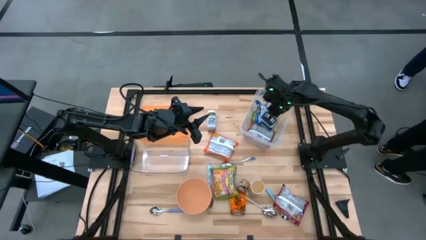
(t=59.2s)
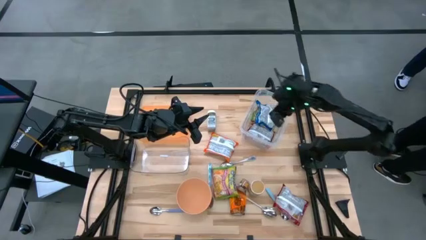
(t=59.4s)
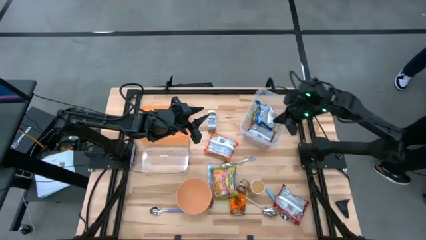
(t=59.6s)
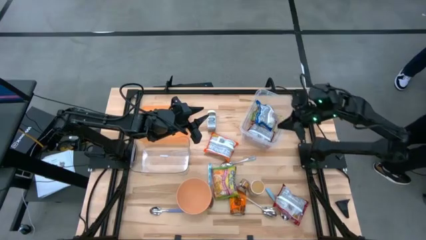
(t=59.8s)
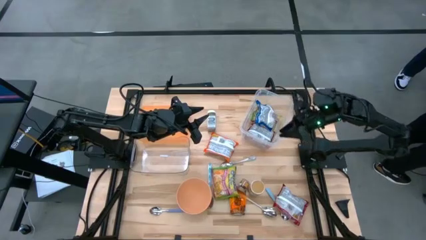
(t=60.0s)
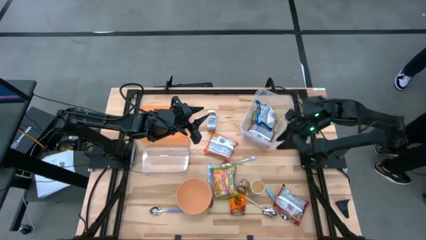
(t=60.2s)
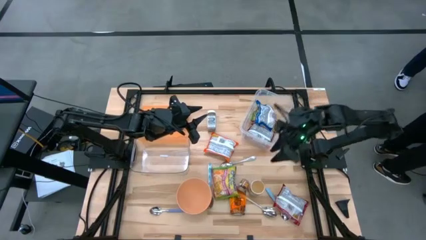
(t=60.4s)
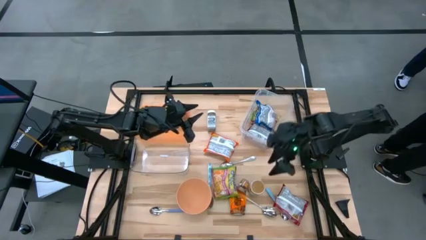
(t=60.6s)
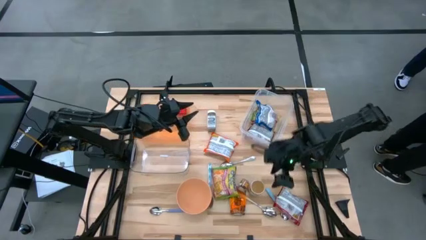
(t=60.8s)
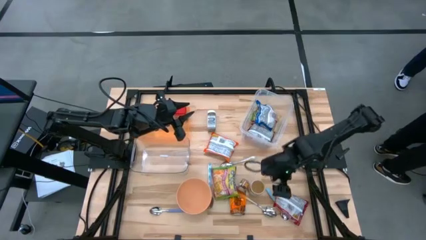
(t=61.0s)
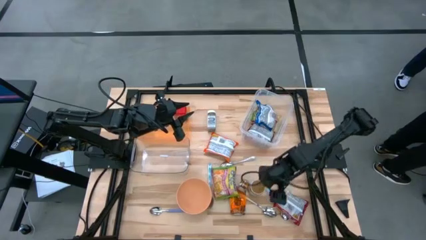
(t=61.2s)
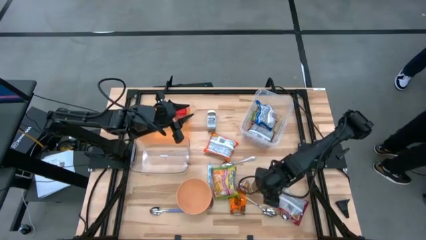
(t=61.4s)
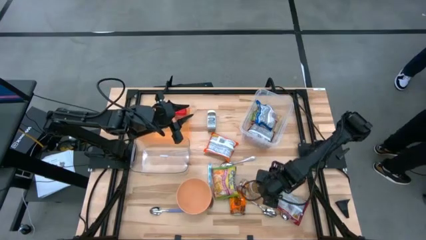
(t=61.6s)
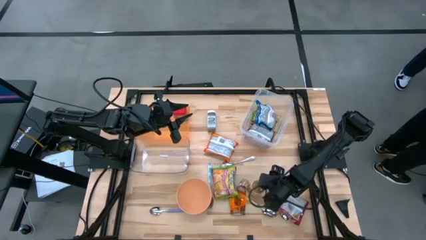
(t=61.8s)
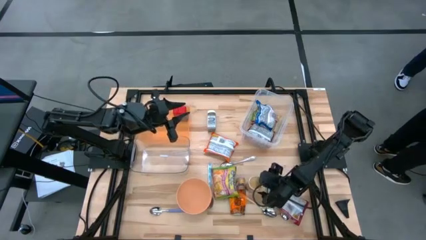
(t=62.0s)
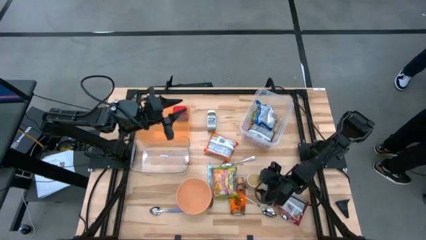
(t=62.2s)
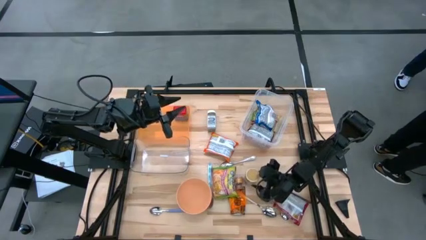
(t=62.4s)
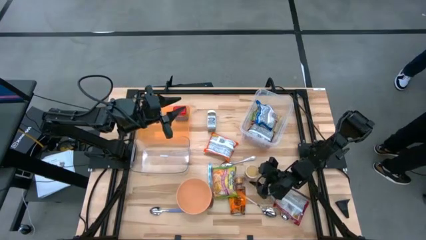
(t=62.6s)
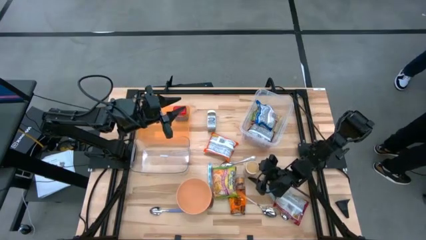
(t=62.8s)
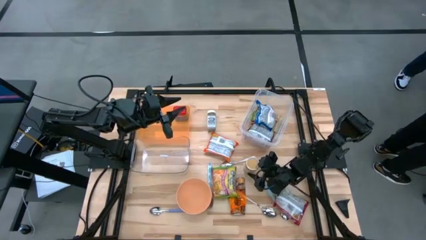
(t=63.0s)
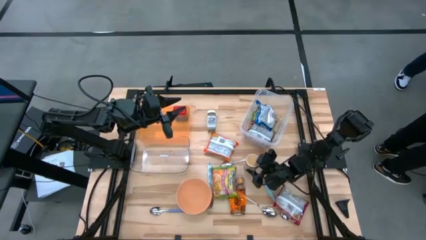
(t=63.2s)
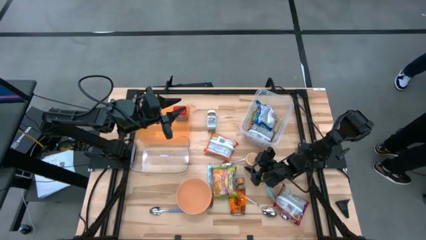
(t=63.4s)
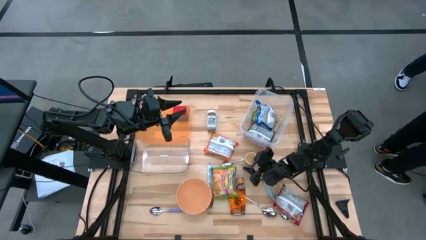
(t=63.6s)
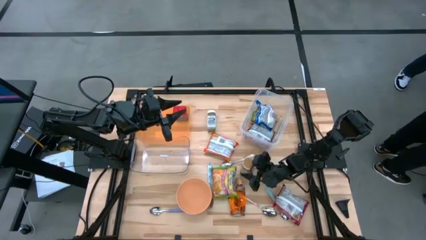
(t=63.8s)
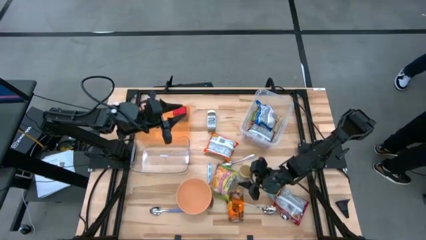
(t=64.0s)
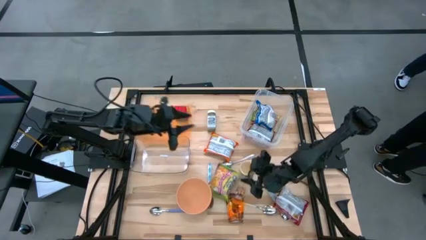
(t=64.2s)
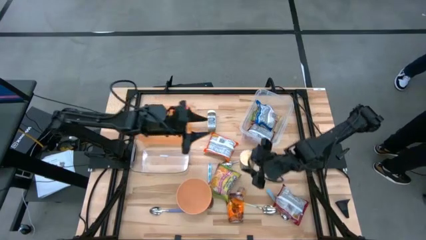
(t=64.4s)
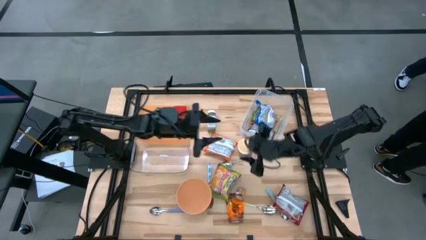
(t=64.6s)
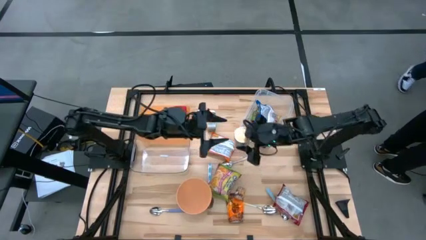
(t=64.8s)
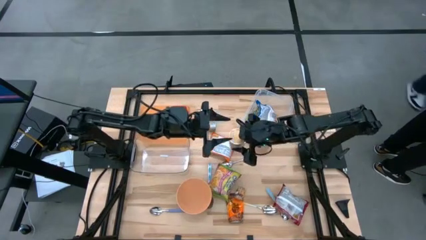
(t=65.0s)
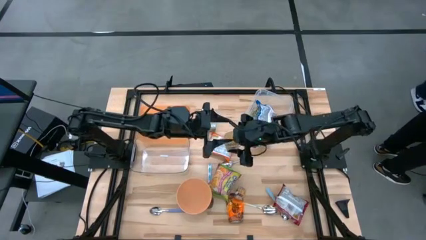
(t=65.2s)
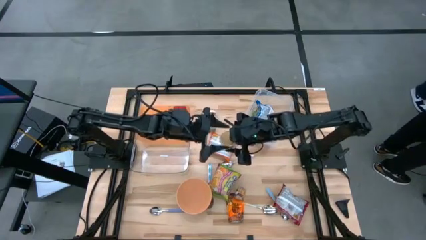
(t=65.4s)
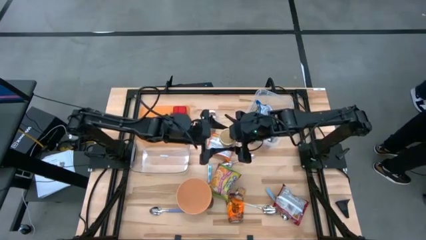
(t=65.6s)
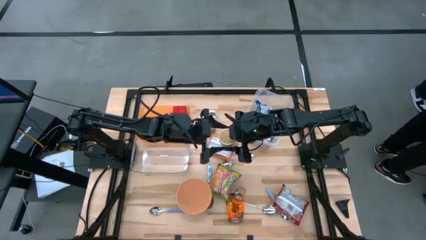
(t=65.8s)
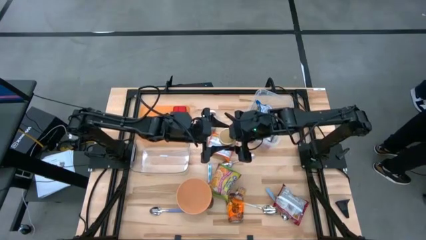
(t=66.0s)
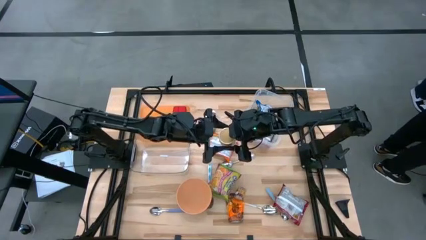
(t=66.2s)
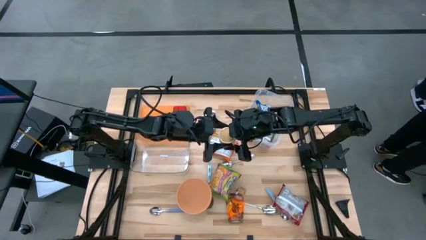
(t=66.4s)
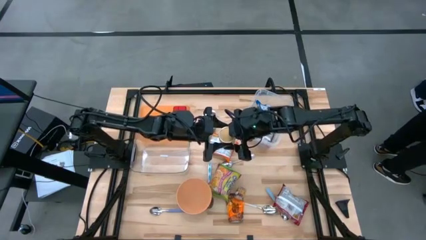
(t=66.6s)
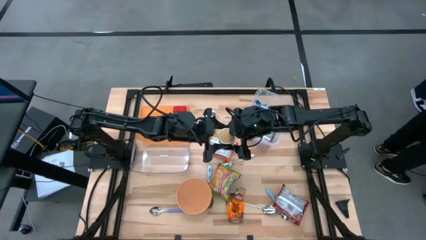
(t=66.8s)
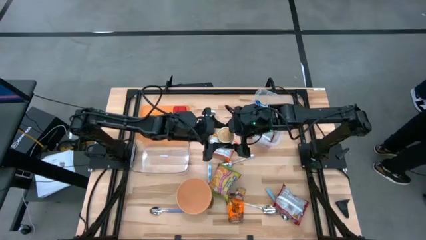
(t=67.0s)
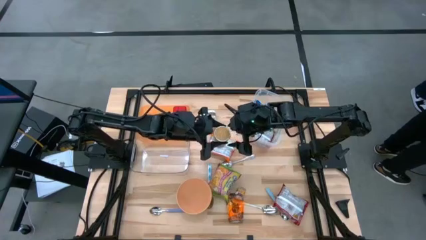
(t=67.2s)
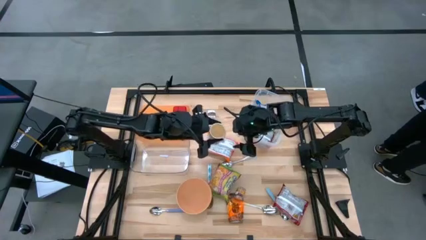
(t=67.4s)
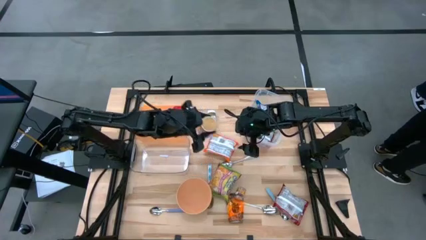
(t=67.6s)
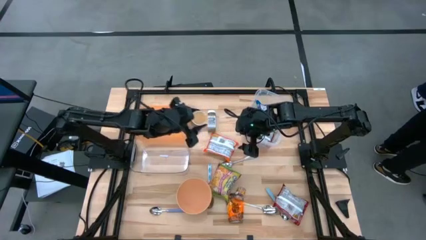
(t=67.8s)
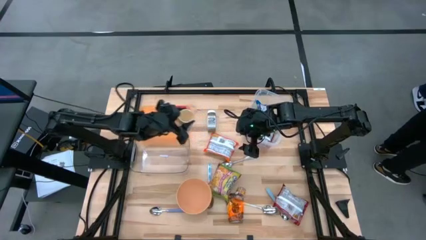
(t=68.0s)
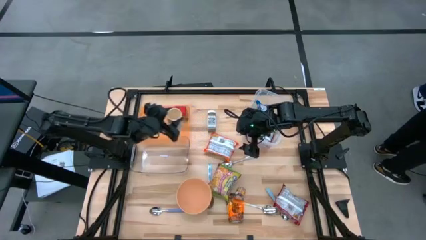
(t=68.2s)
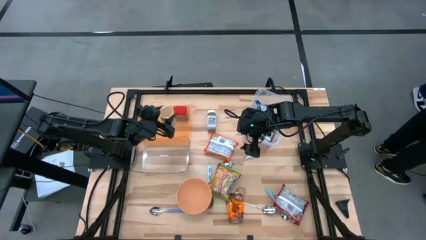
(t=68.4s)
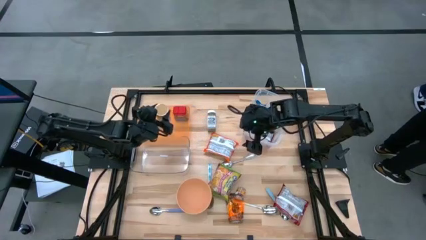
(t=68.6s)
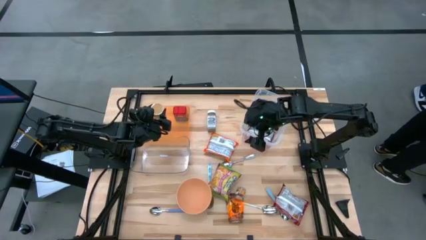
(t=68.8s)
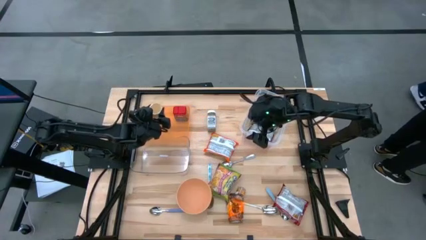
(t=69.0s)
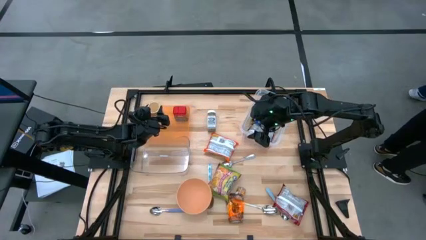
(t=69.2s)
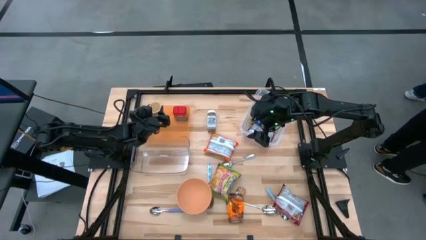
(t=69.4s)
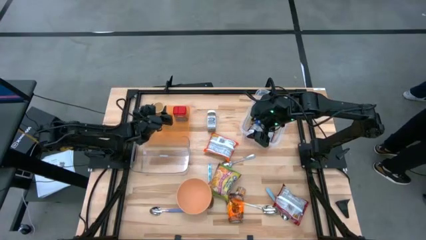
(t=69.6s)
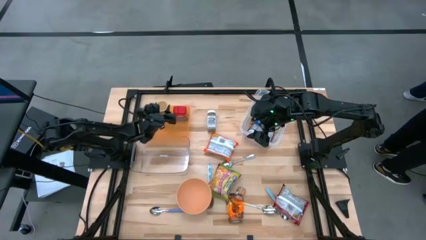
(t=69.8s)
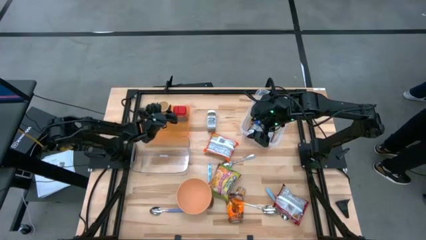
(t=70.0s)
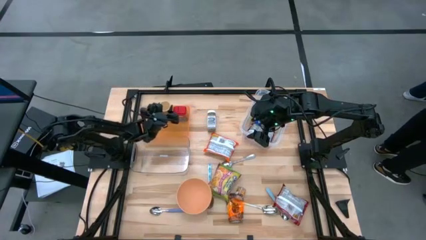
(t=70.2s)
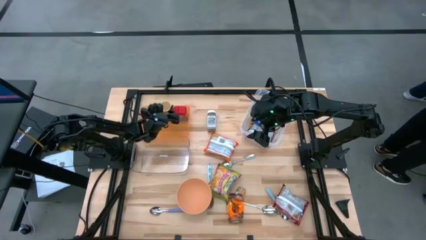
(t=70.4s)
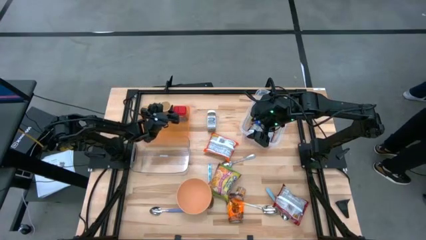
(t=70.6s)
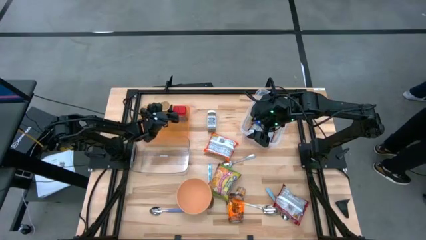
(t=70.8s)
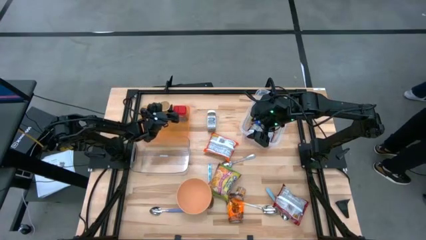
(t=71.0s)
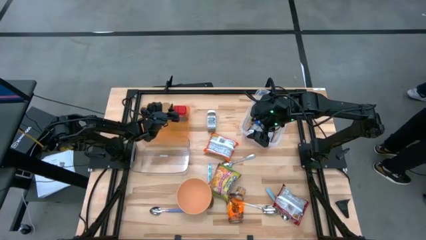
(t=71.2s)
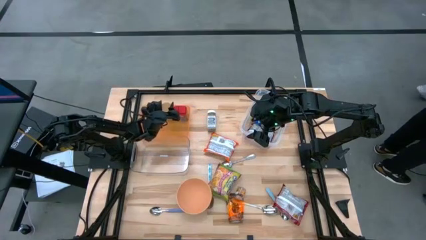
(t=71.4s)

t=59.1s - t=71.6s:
Task: Pick & Place Food Item
Put the golden seasoning bottle into the orange bin
